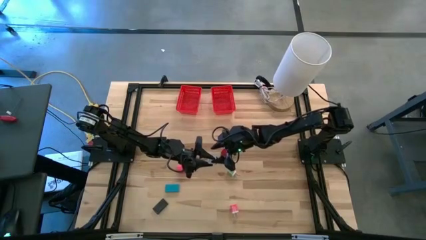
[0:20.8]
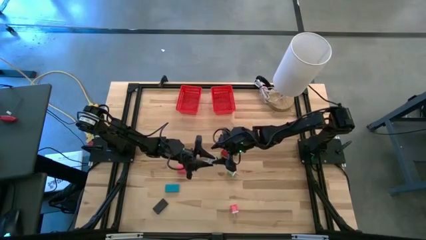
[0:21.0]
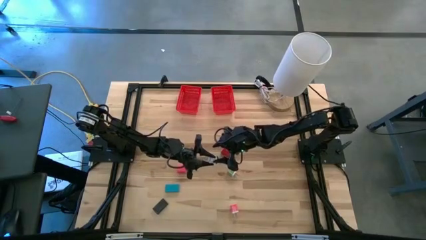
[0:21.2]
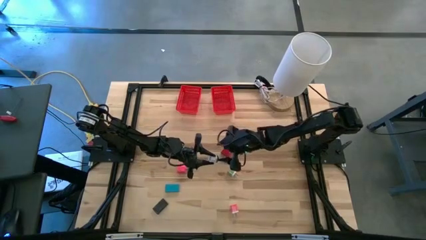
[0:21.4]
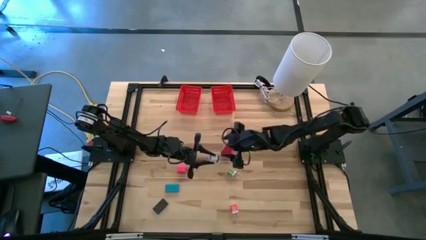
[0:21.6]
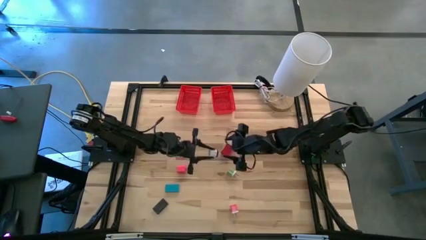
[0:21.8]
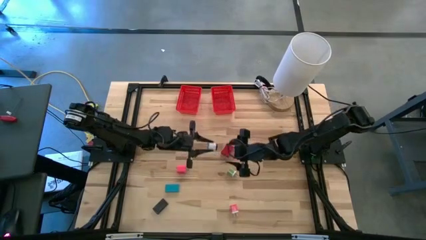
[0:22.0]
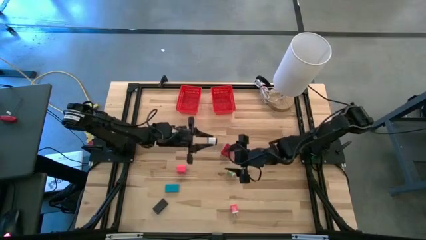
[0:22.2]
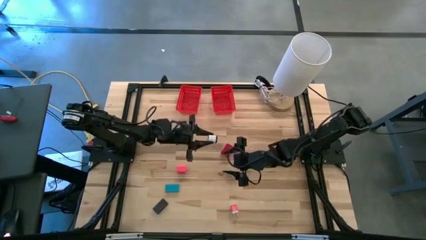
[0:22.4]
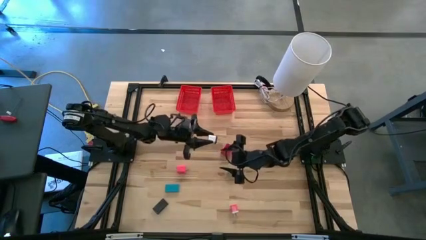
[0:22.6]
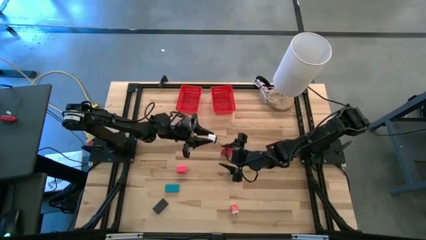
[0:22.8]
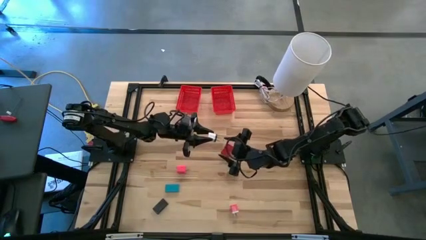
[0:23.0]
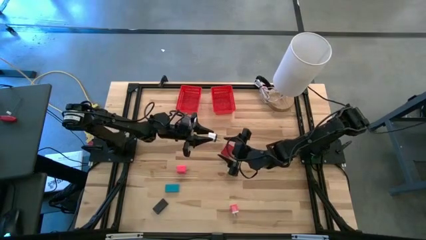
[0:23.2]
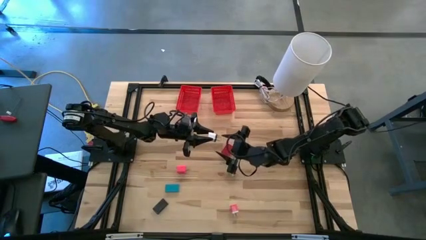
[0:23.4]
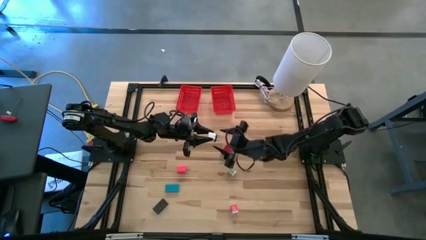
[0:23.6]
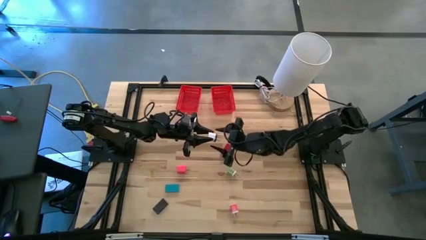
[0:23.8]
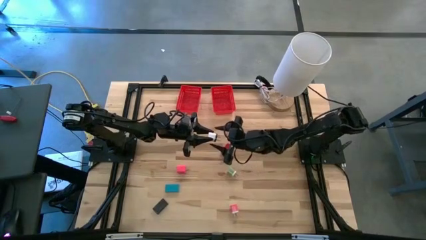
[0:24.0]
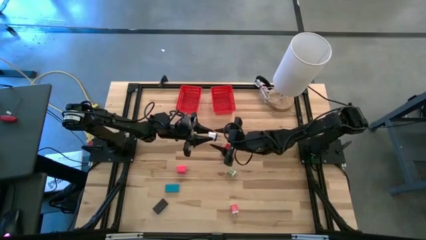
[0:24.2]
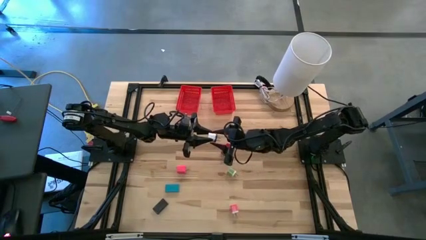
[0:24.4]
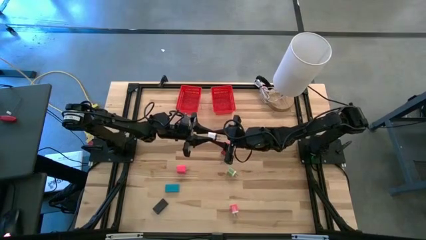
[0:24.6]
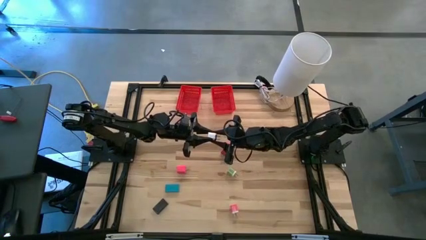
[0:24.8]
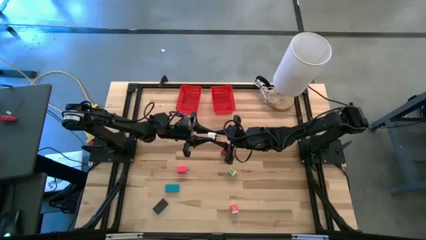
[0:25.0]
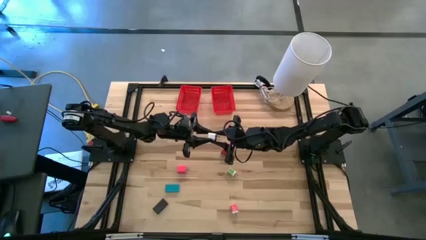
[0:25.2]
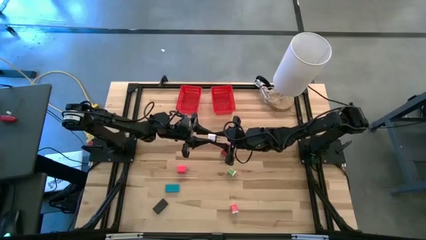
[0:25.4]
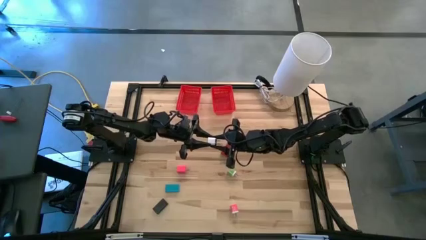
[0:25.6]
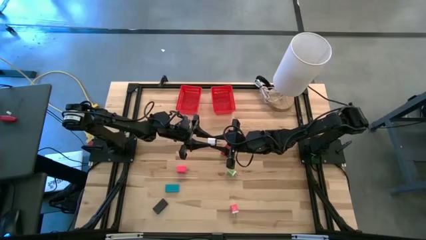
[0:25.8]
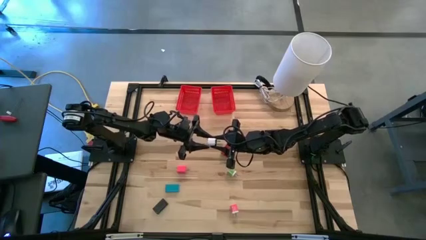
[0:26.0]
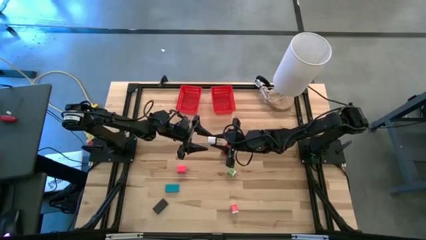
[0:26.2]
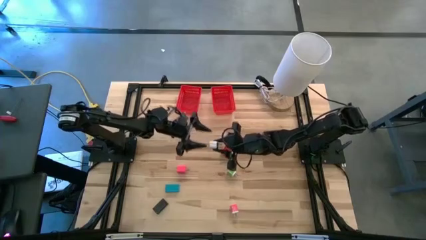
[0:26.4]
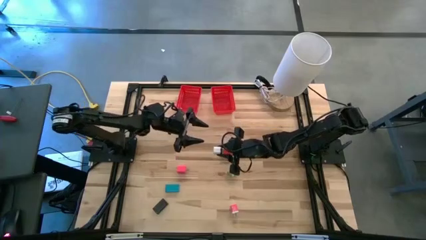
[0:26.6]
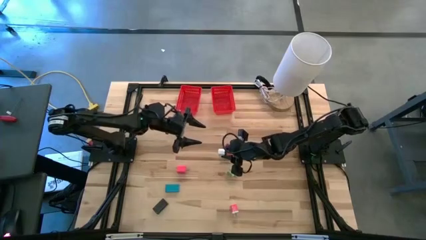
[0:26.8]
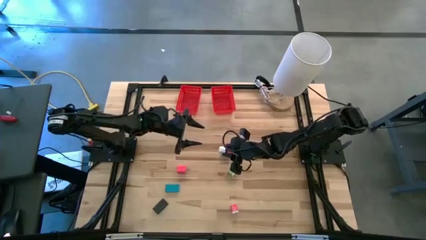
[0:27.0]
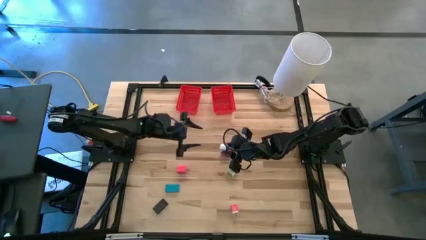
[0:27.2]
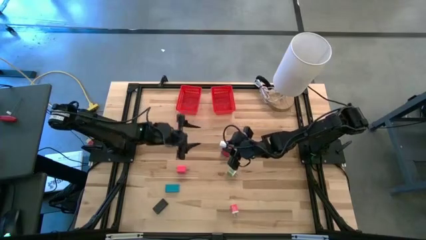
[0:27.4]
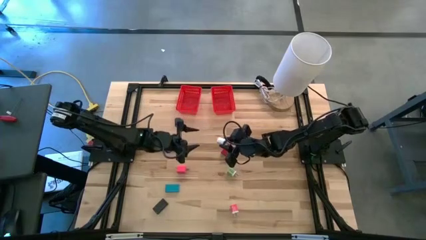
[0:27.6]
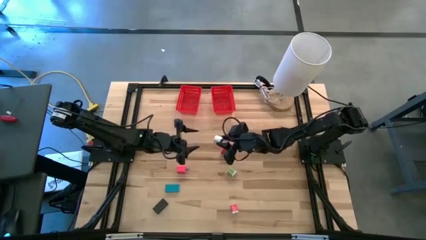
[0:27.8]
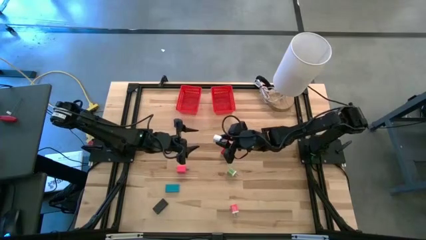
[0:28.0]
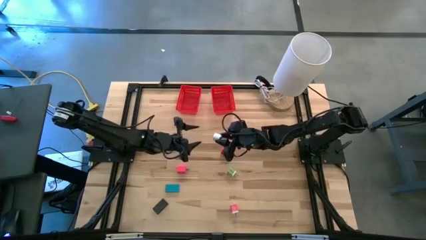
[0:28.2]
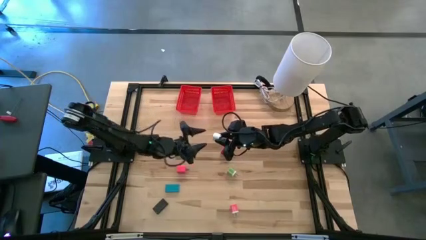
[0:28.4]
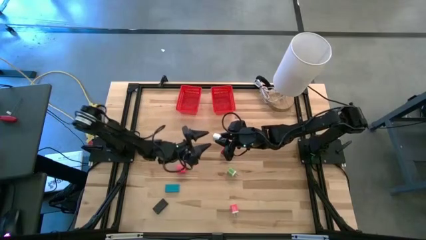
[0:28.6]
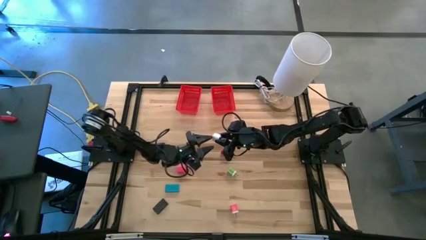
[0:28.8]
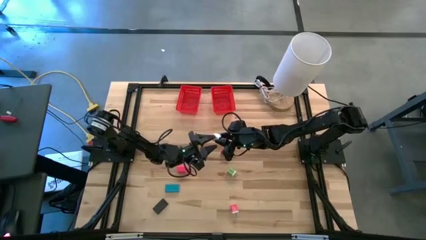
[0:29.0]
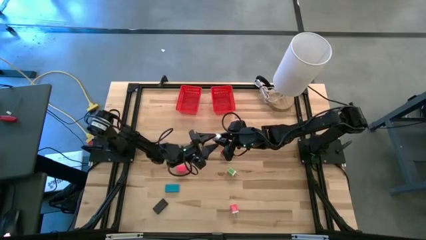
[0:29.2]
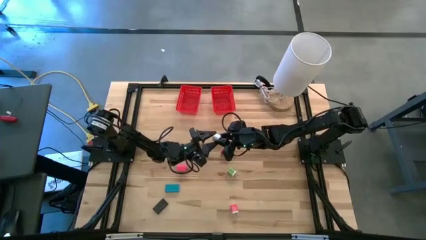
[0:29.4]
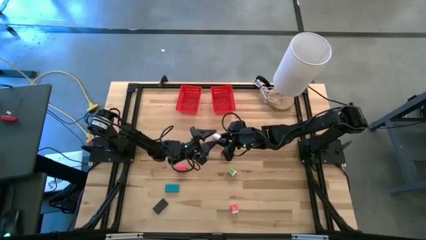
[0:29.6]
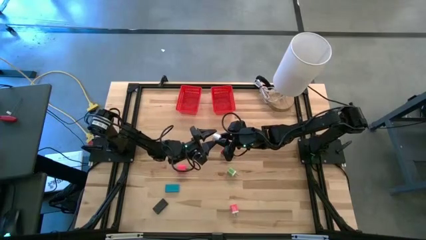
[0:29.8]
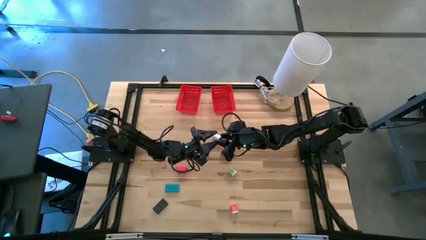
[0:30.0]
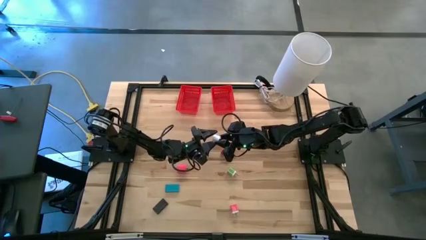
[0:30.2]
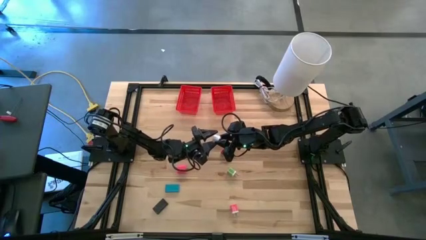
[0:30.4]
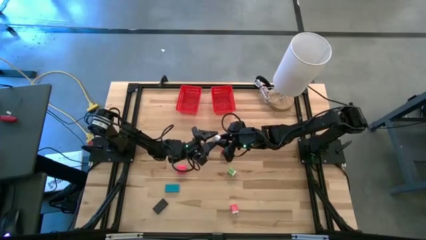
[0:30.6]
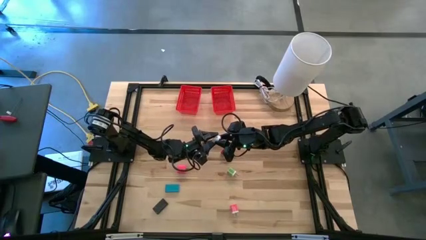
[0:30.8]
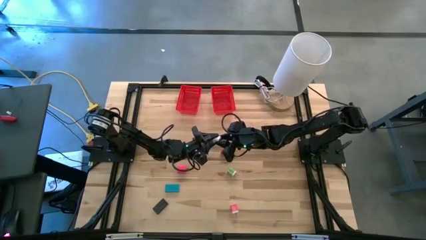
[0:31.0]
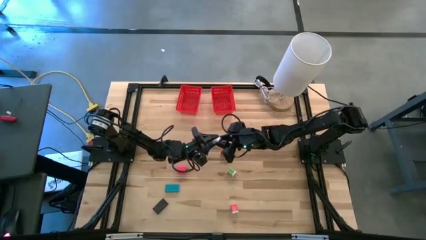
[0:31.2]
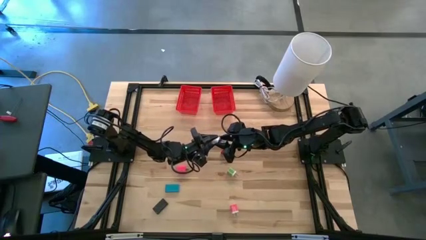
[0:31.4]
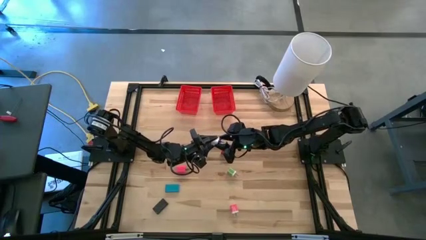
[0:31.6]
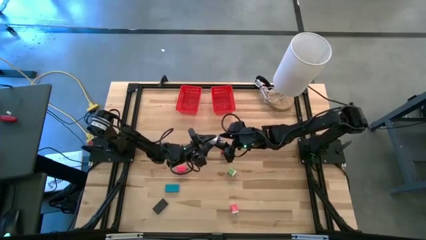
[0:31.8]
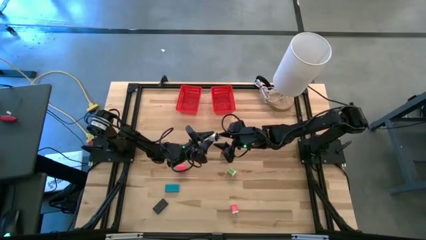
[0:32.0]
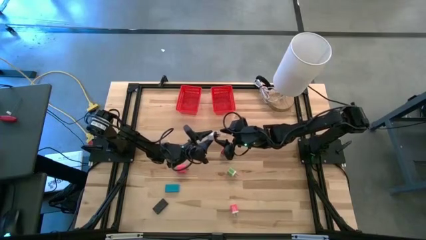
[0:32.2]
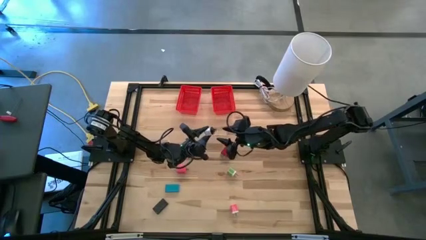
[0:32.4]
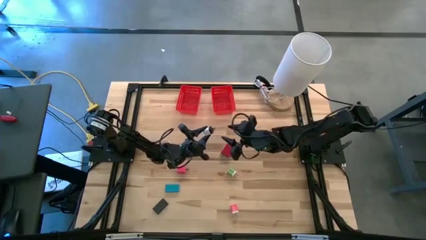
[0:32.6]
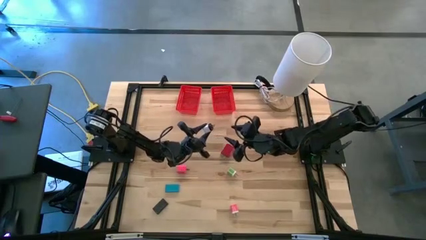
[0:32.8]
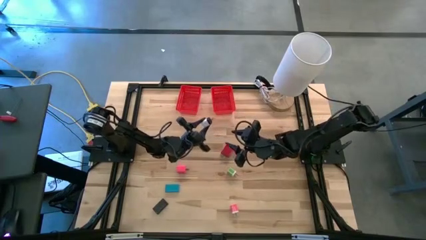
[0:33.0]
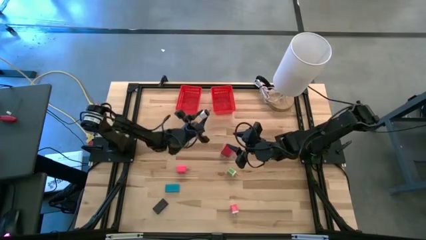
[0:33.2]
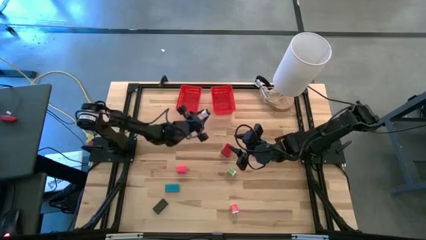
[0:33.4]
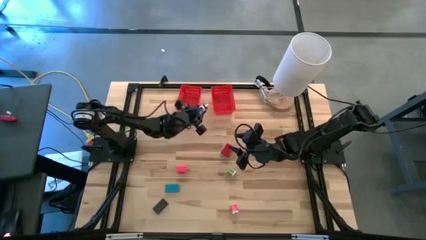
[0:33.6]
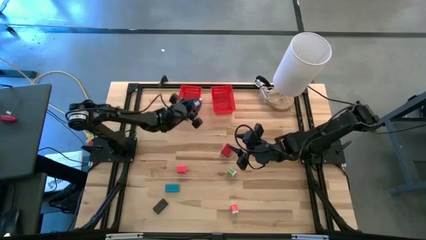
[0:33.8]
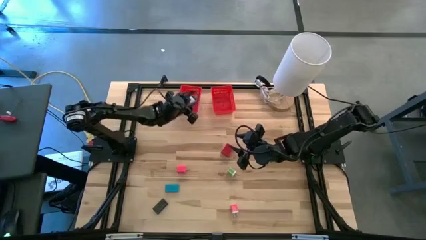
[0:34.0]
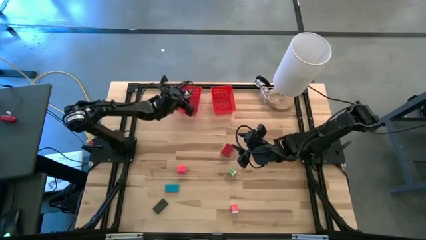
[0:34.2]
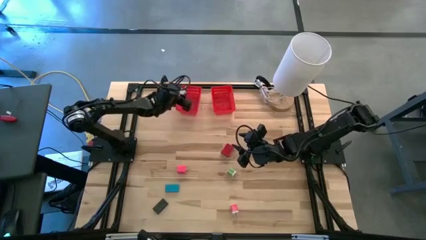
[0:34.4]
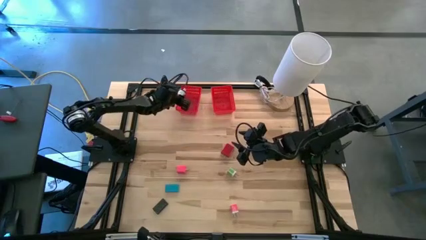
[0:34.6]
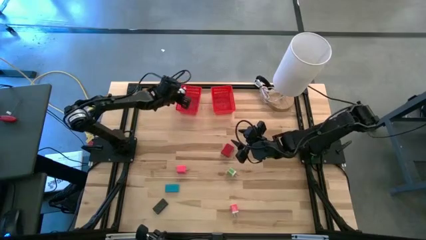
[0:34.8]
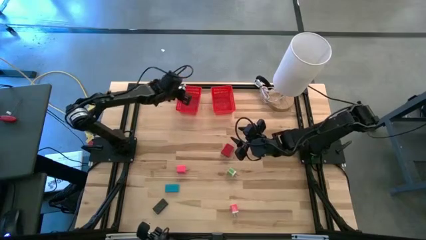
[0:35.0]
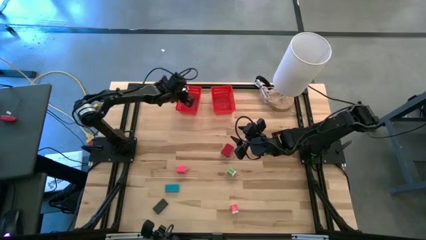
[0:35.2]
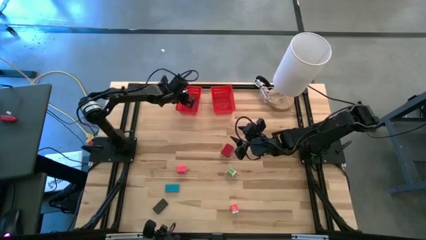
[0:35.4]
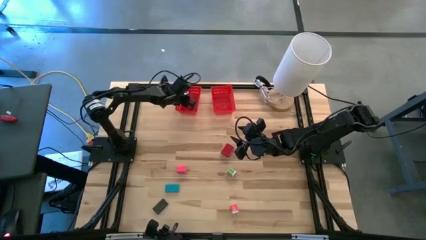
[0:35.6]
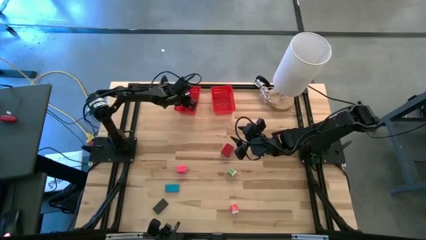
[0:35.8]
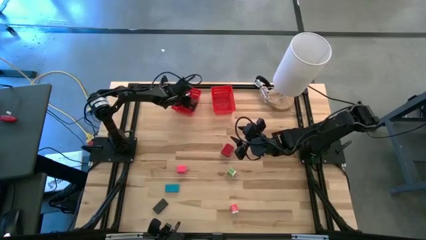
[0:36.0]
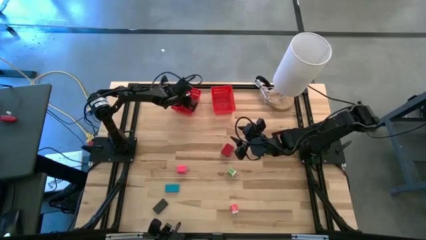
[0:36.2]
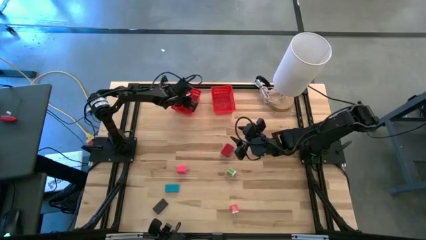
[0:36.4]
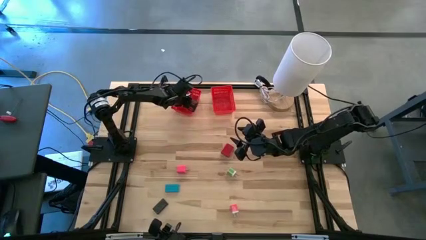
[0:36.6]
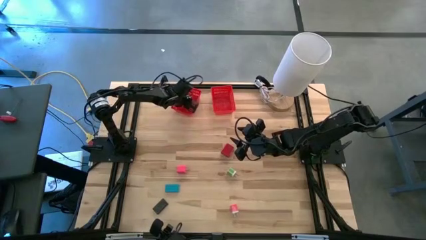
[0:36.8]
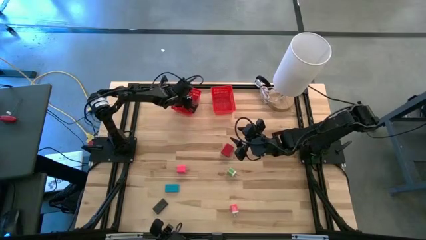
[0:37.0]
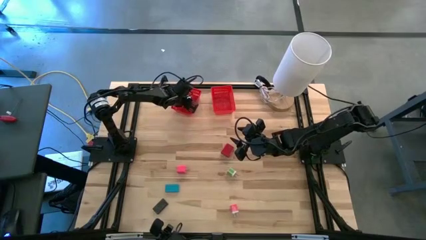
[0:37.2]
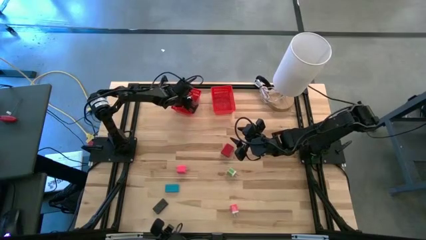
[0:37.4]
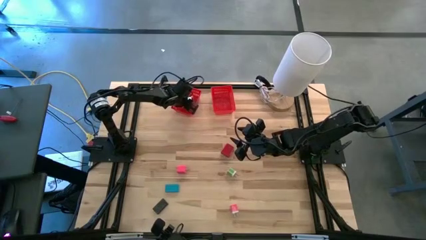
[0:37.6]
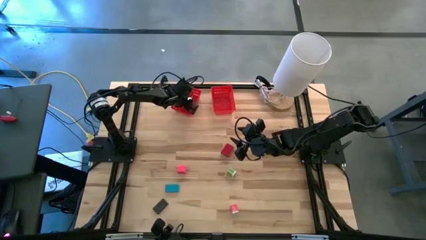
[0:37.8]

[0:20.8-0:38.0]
Task: Pick & Place Office items
Put the white charger adapter into the left red bin
